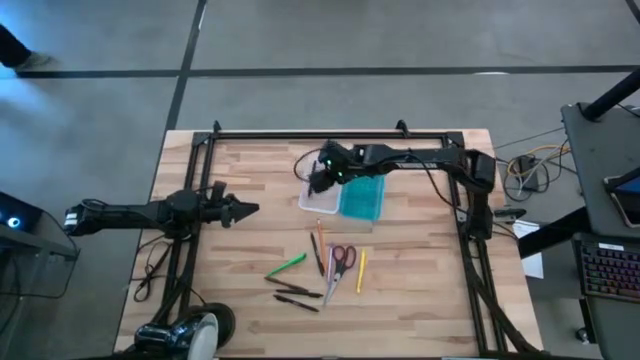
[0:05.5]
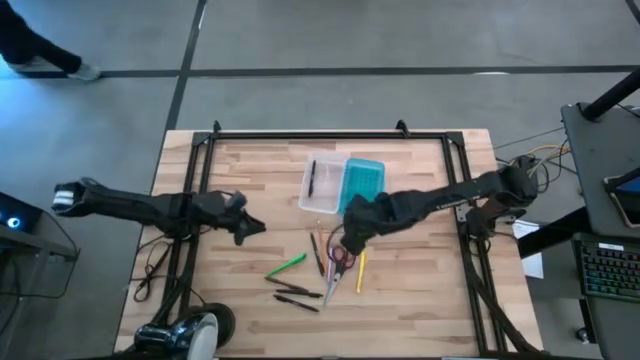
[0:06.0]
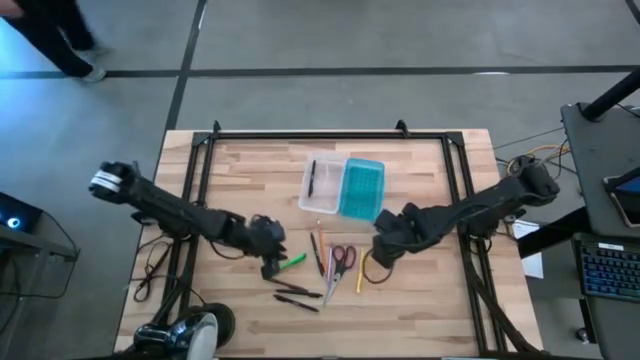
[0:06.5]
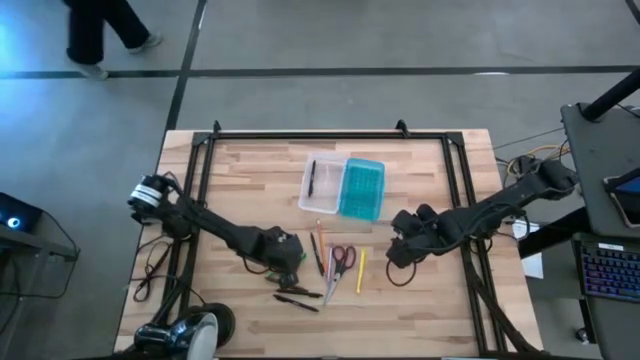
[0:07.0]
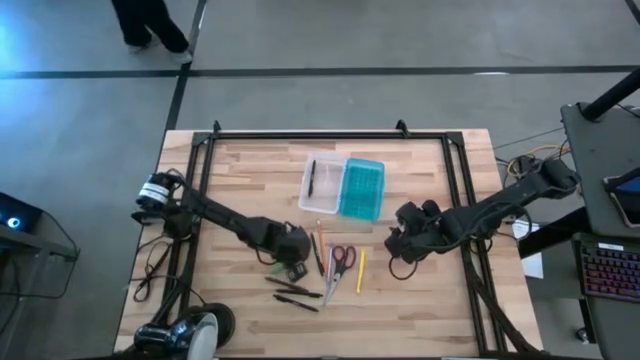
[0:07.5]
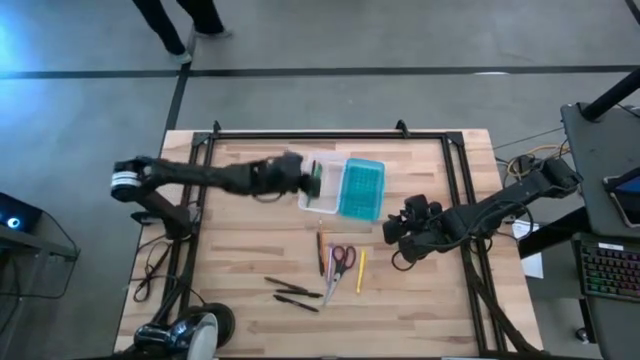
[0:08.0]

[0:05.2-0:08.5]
Task: Pick & place school supplies into a supply box
Put the green pen into the supply box

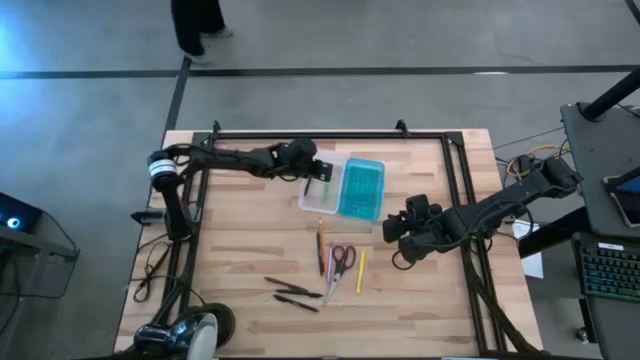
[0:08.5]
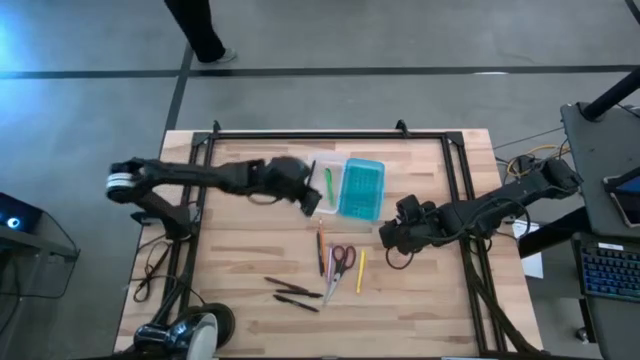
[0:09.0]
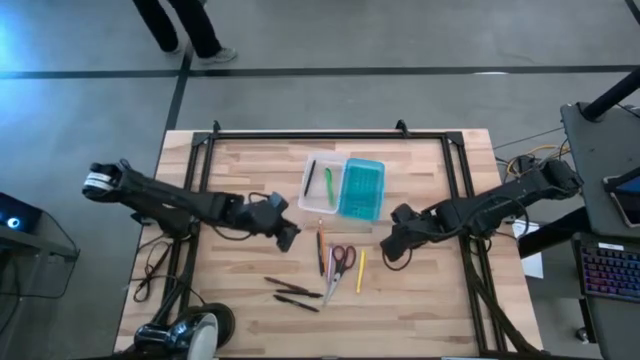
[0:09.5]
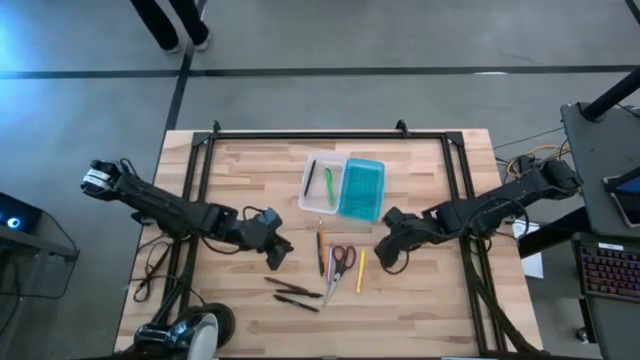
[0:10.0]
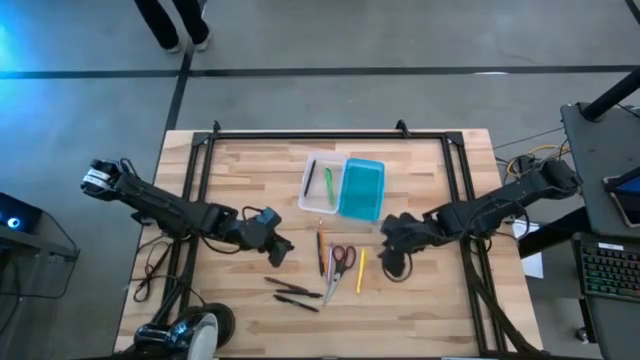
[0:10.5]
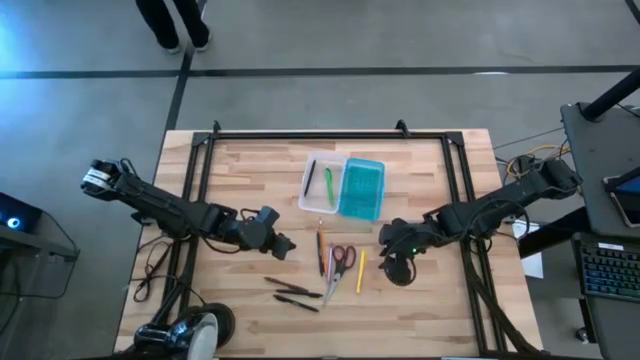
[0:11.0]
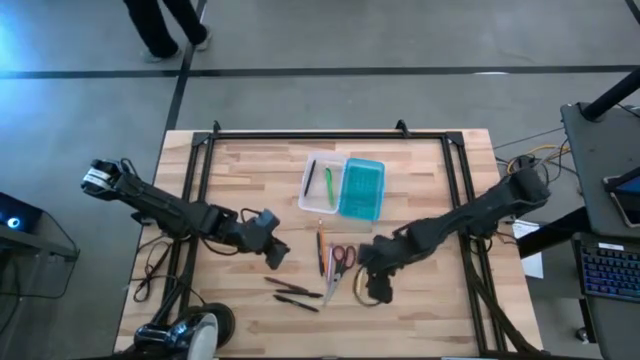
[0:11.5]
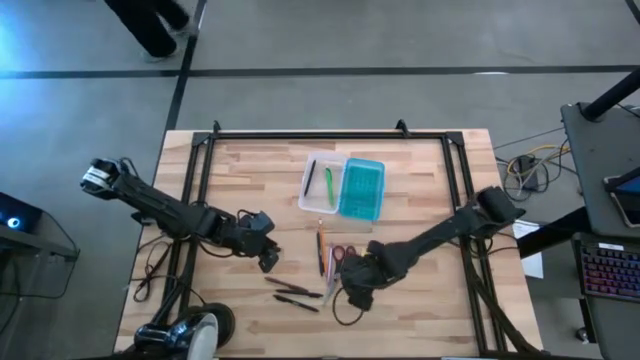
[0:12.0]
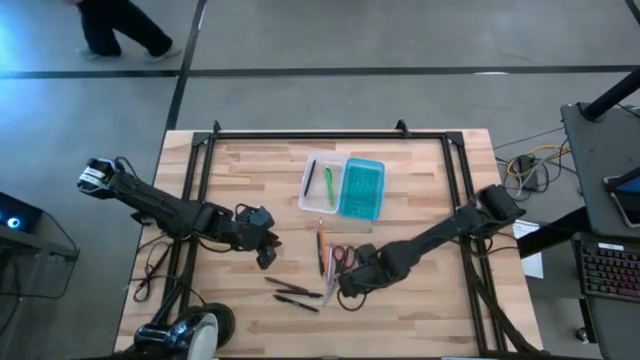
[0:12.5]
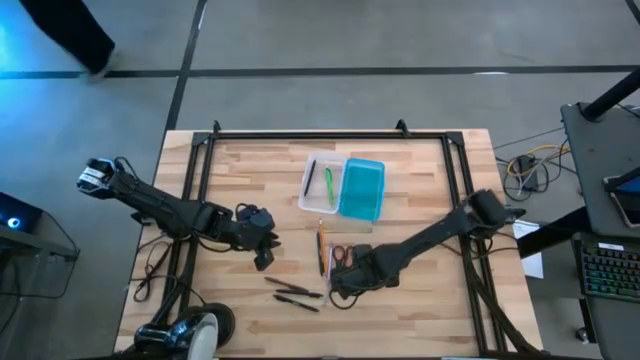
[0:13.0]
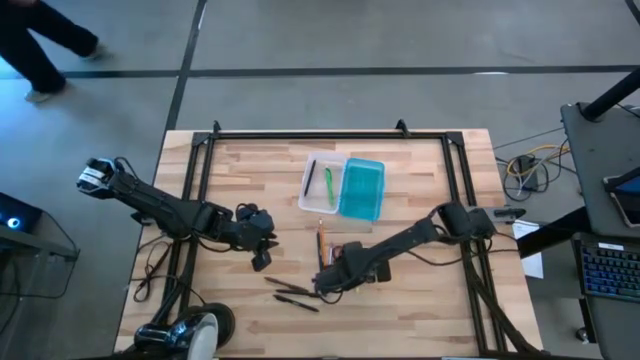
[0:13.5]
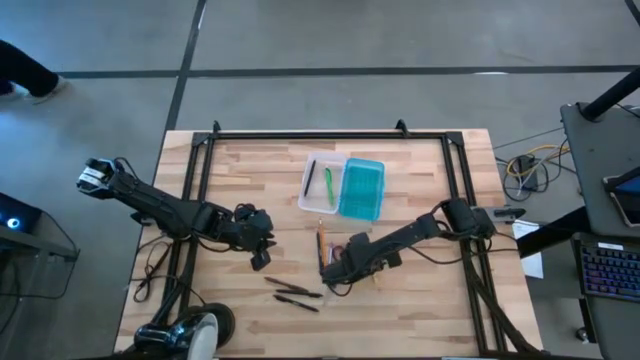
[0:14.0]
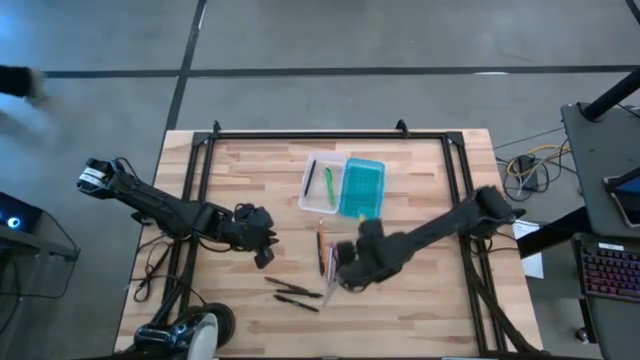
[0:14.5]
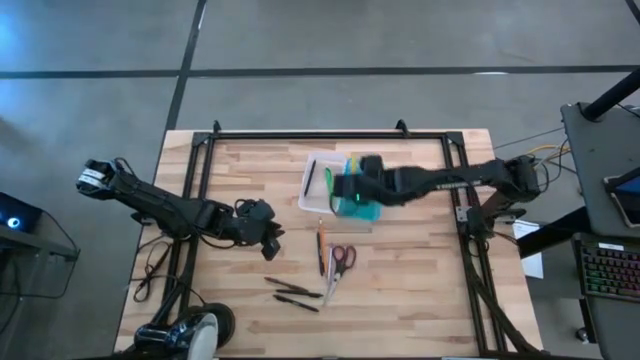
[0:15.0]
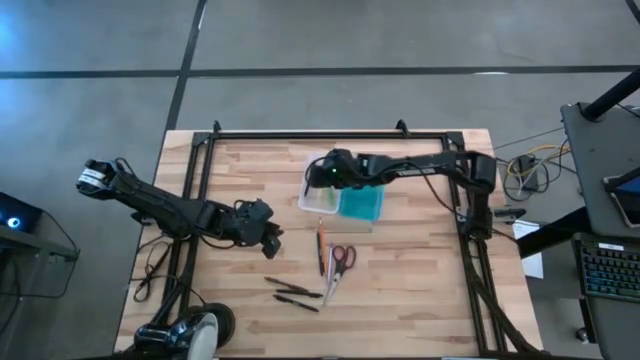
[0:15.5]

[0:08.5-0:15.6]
Put the yellow pen into the supply box

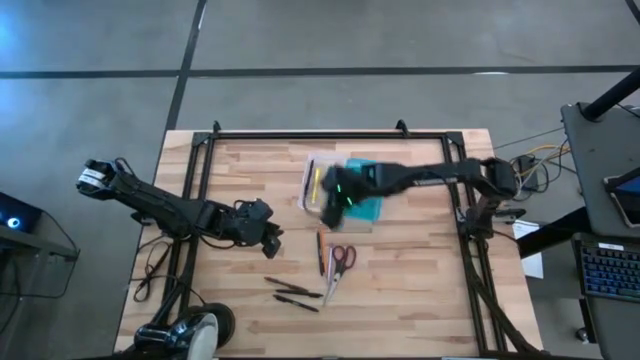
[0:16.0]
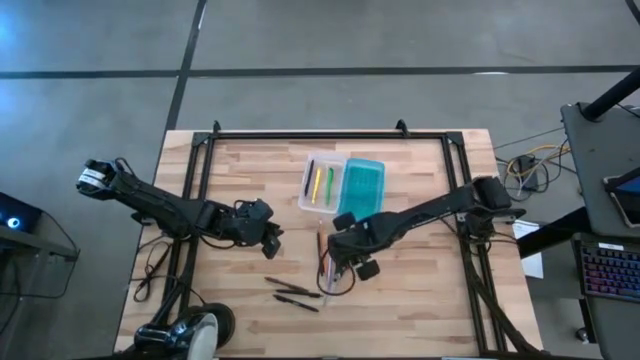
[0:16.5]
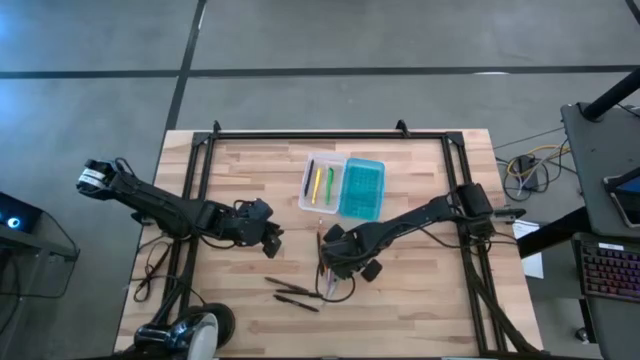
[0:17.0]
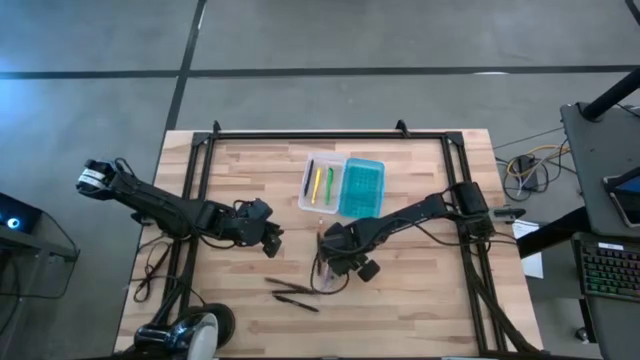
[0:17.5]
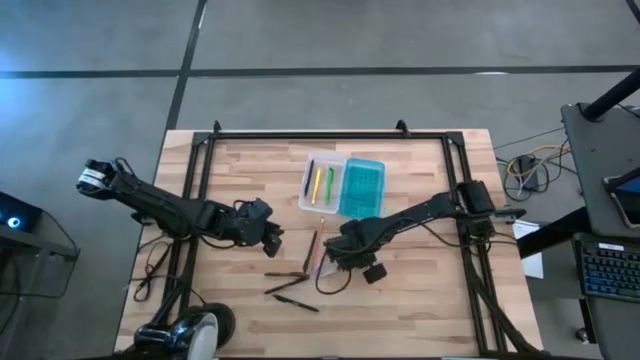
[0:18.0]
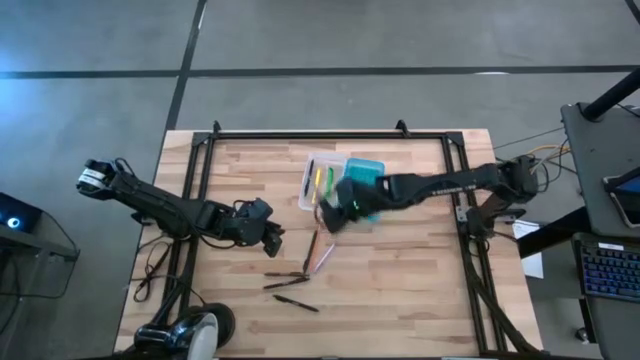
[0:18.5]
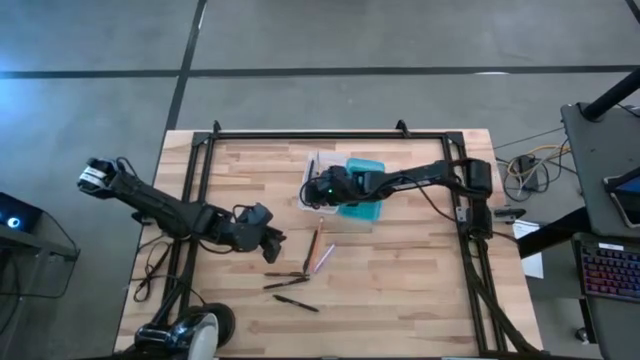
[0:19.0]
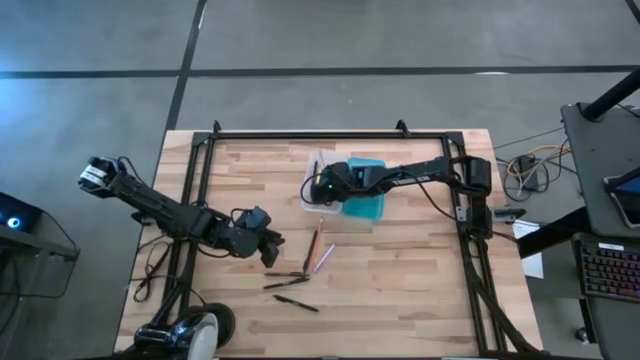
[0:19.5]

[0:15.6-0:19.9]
Put the scissors into the supply box

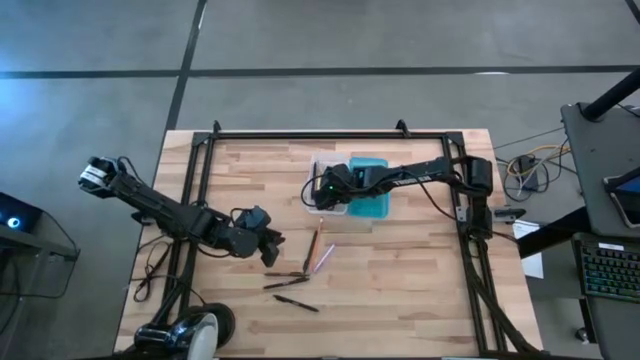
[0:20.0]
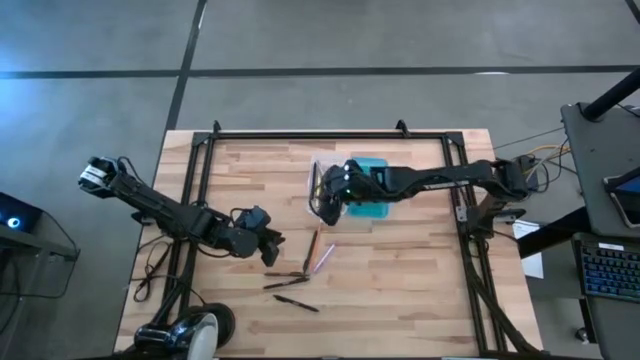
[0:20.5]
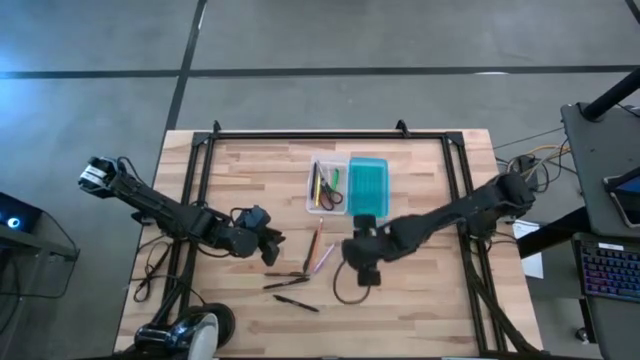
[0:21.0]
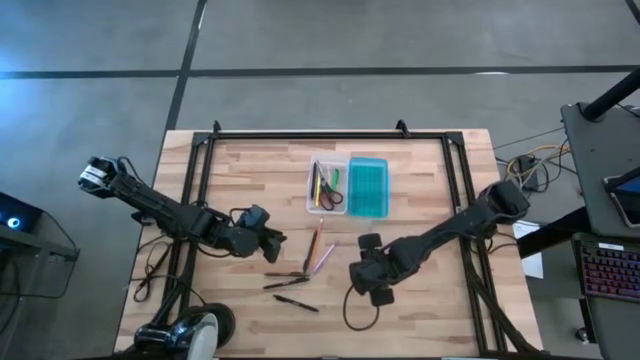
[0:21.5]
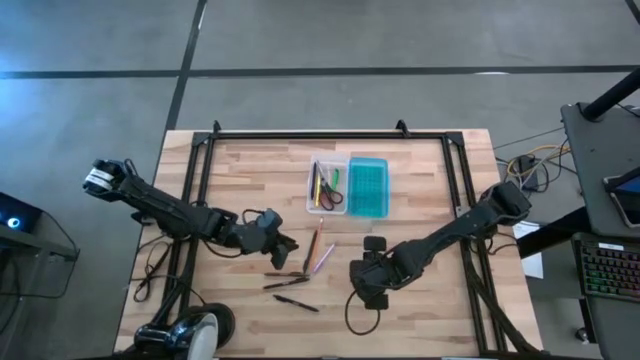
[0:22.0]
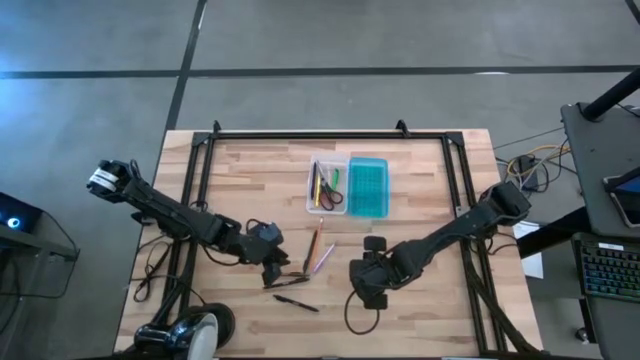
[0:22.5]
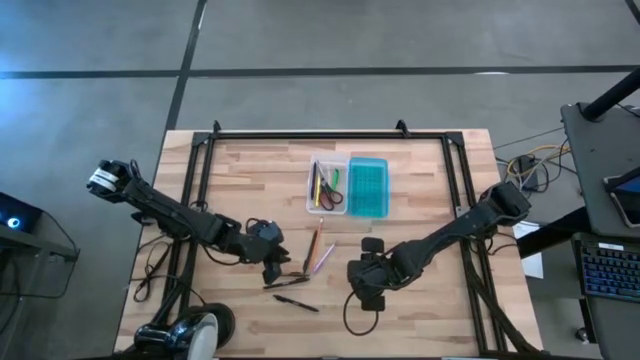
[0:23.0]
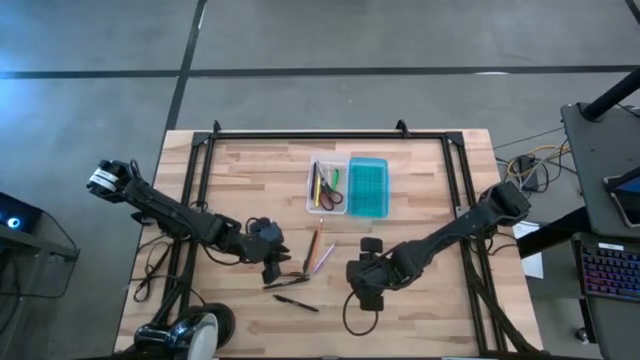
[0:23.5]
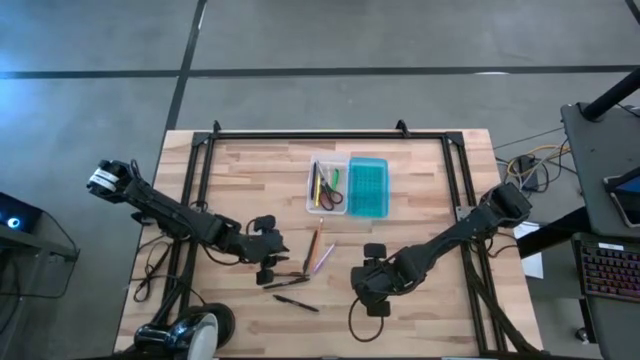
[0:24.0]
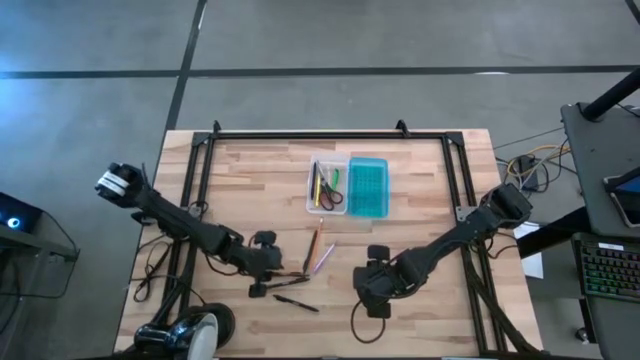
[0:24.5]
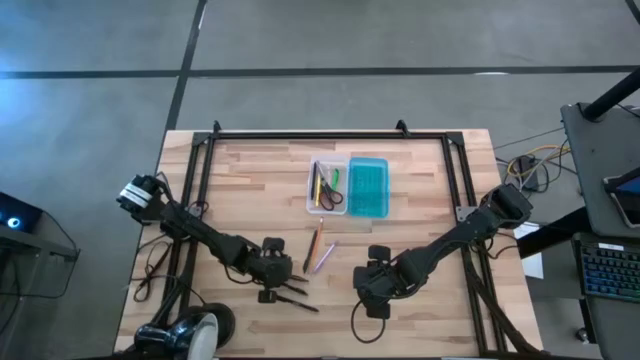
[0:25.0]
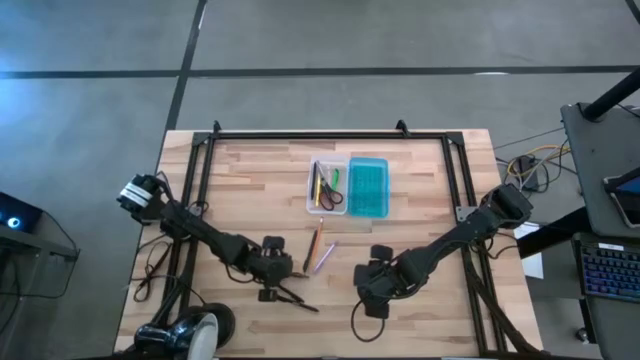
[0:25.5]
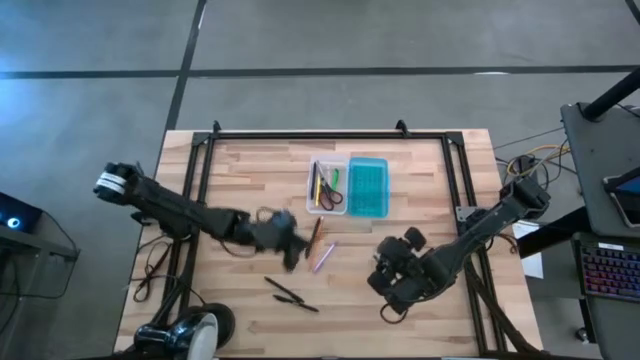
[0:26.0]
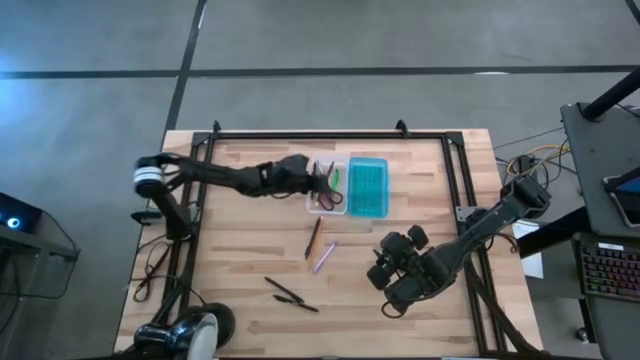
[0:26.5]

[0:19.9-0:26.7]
Put the brown pen into the supply box

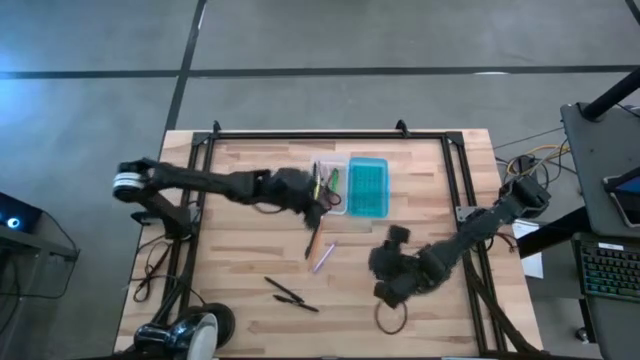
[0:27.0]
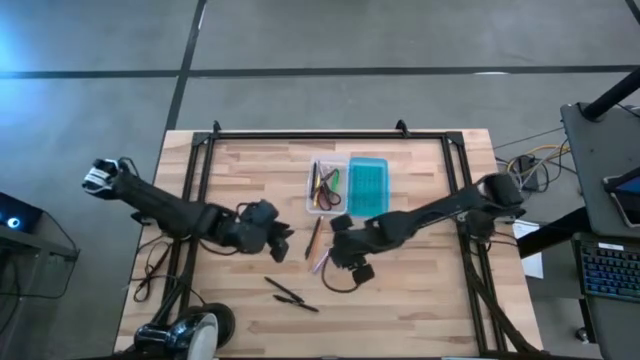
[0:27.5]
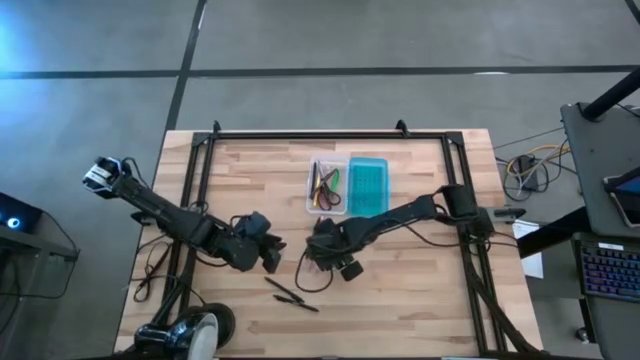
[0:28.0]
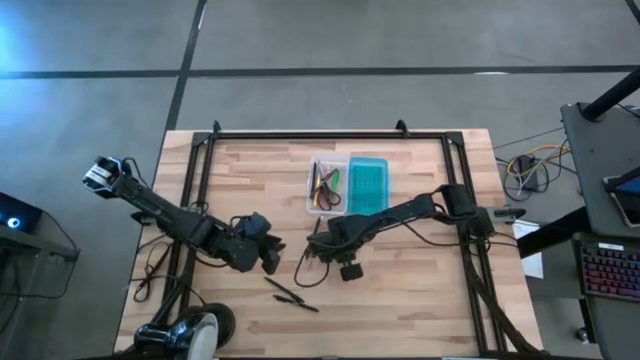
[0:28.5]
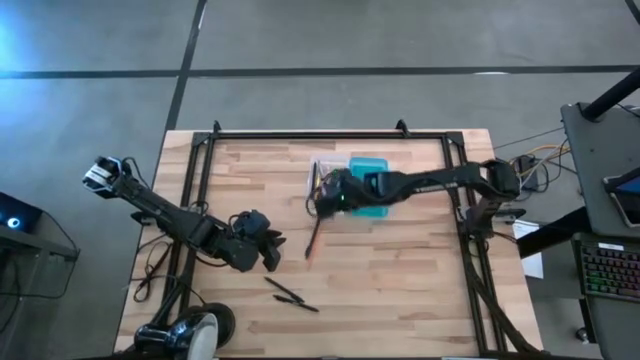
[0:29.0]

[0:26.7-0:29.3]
Put the purple pen into the supply box
